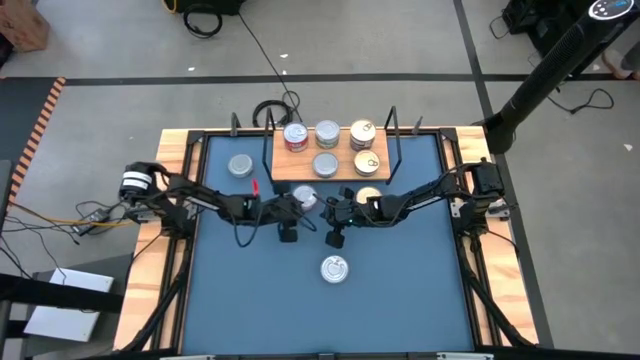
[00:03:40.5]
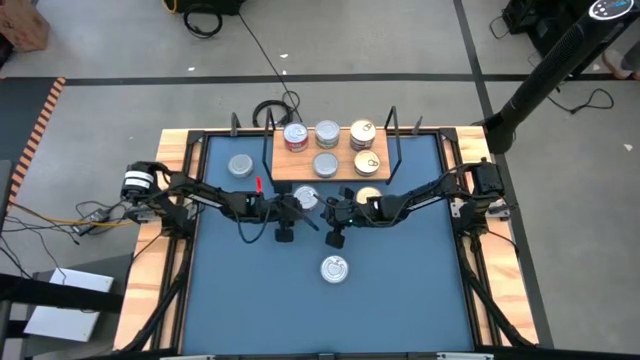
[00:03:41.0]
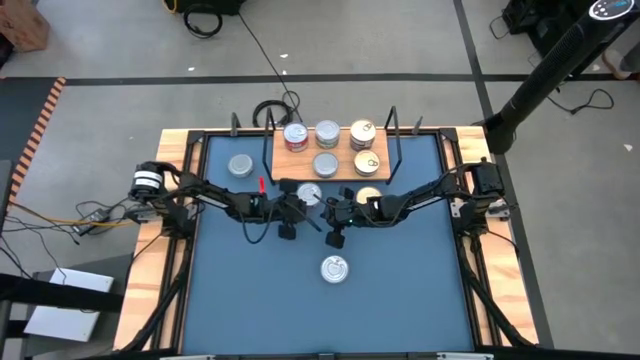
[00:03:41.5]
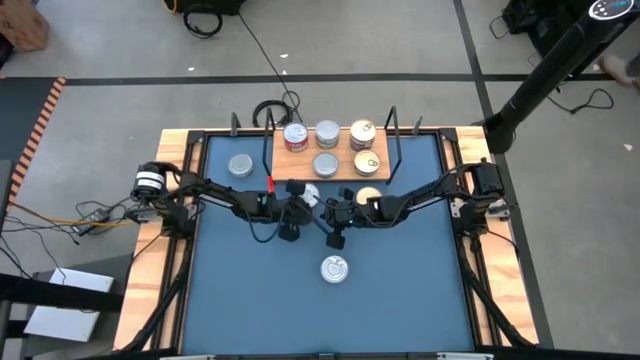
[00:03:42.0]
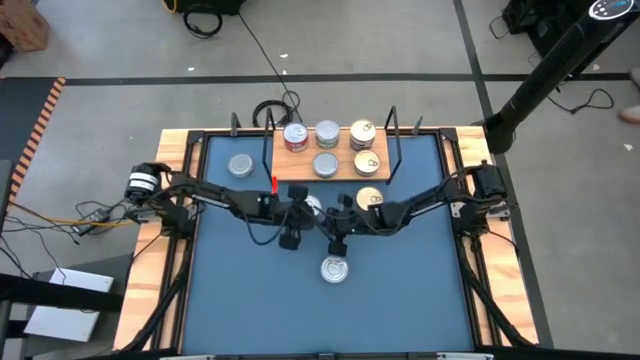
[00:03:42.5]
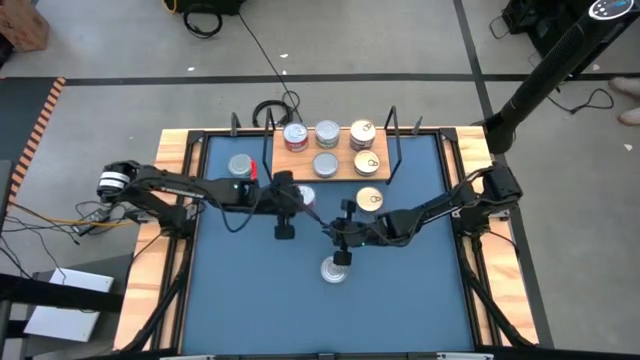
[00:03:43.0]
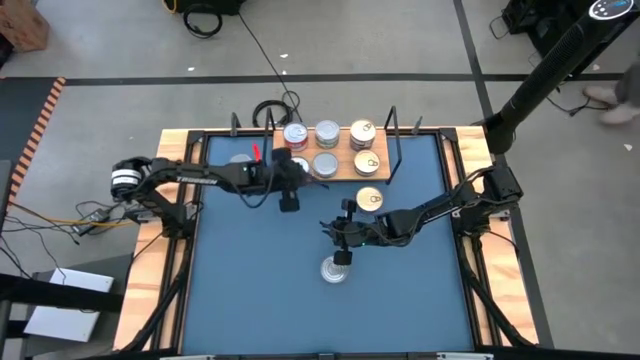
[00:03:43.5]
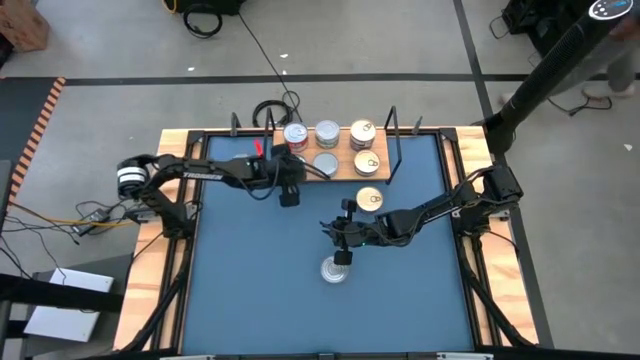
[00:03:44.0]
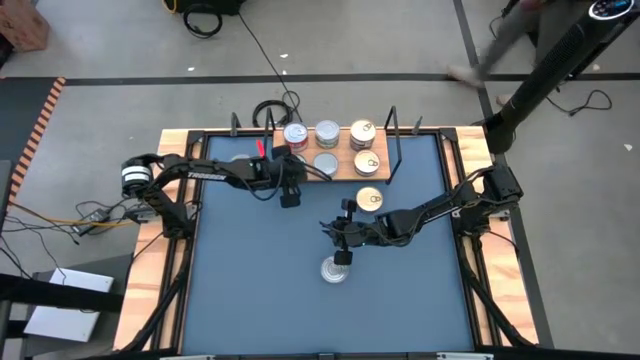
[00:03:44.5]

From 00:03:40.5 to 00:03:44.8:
Task: Stack canned seafood by type on shelf
Put the tuna can aligned with the stacked red tuna can on the shelf

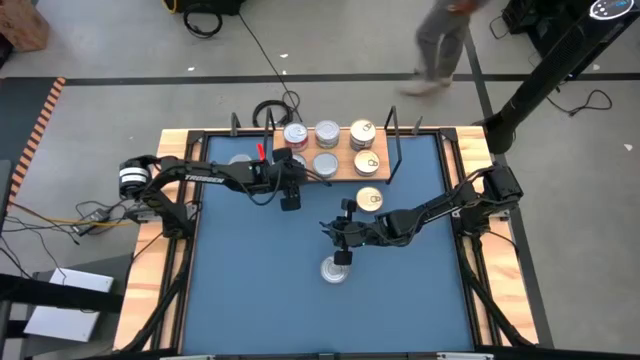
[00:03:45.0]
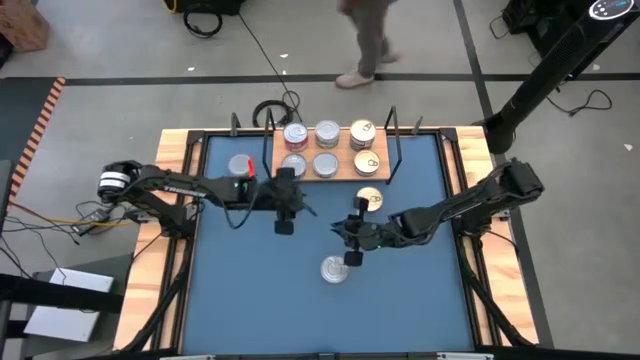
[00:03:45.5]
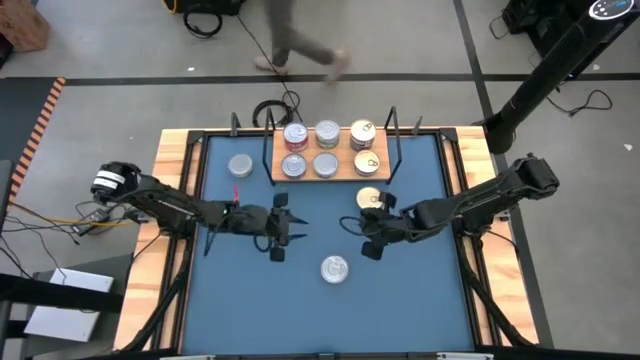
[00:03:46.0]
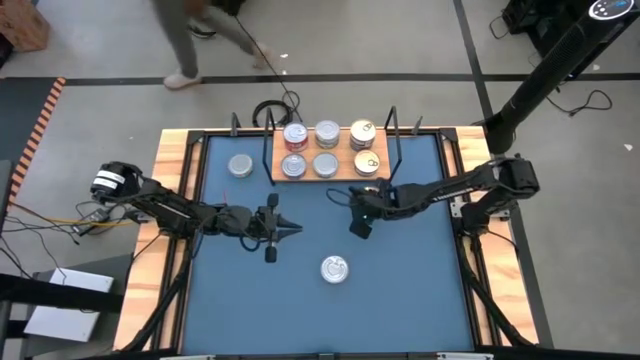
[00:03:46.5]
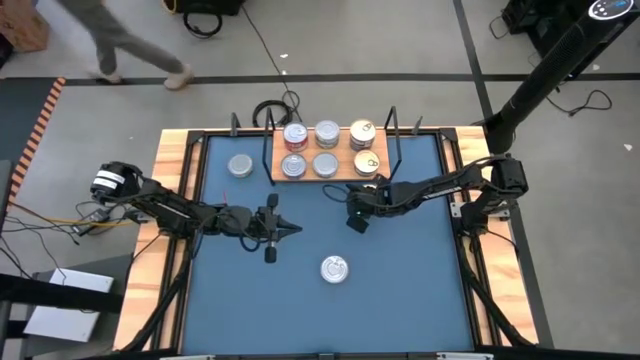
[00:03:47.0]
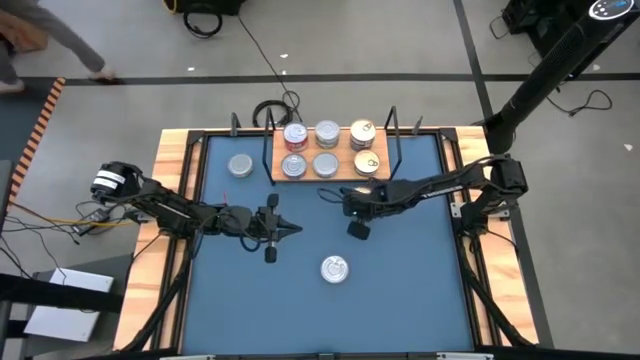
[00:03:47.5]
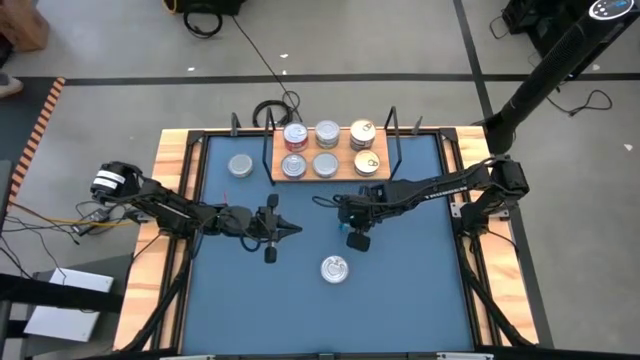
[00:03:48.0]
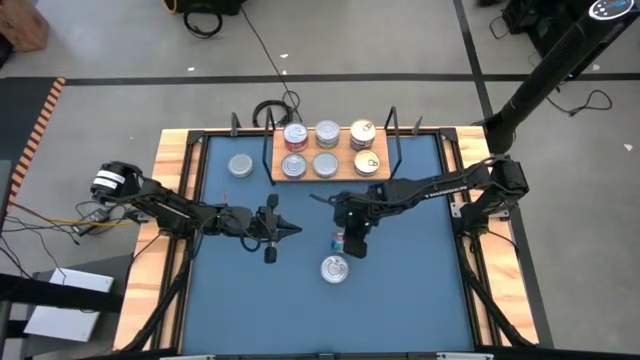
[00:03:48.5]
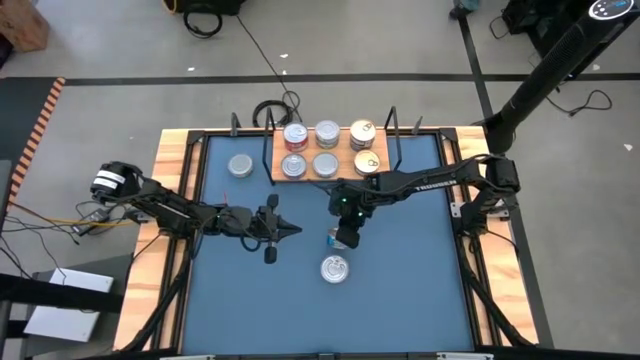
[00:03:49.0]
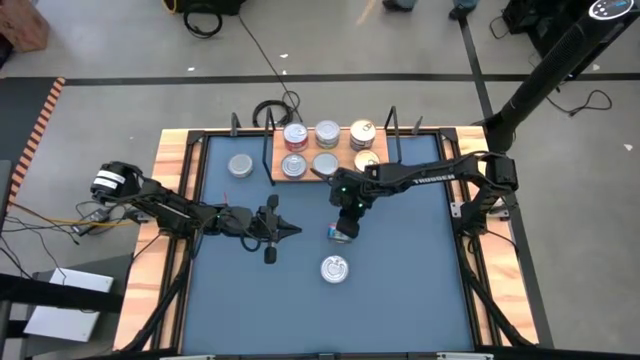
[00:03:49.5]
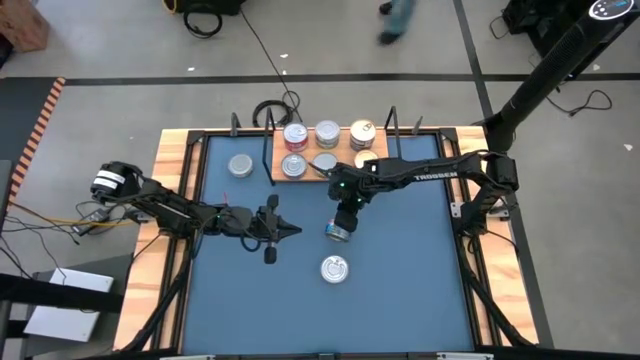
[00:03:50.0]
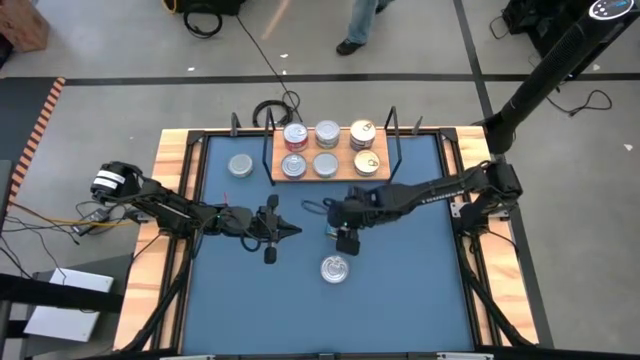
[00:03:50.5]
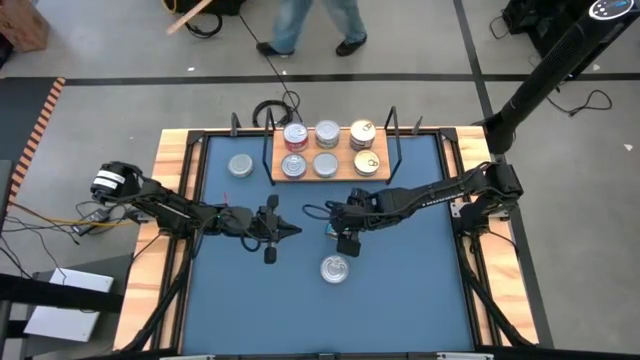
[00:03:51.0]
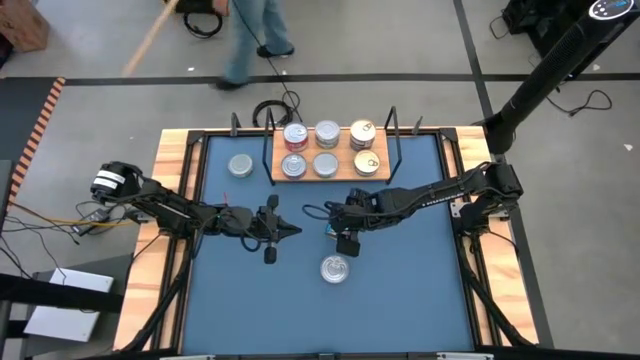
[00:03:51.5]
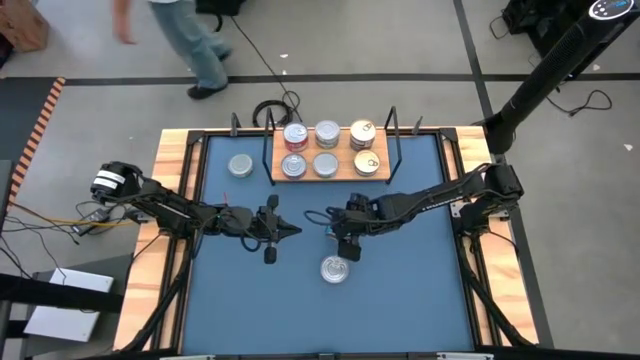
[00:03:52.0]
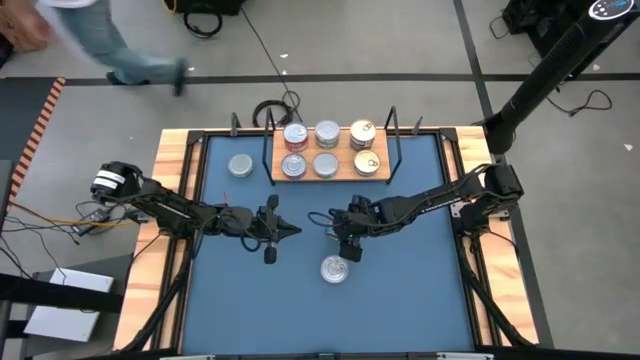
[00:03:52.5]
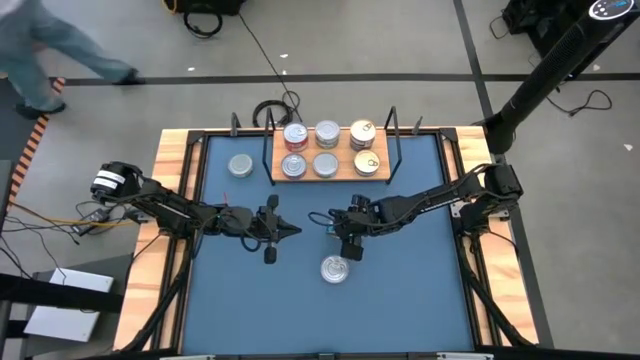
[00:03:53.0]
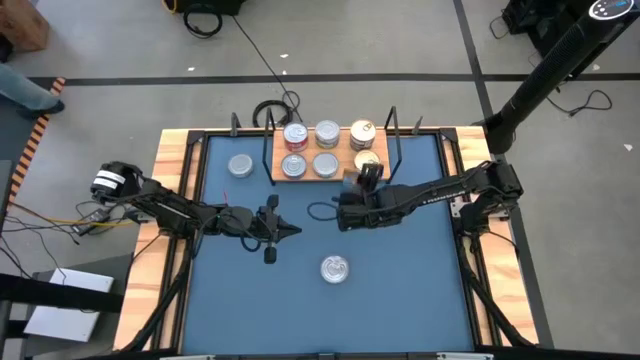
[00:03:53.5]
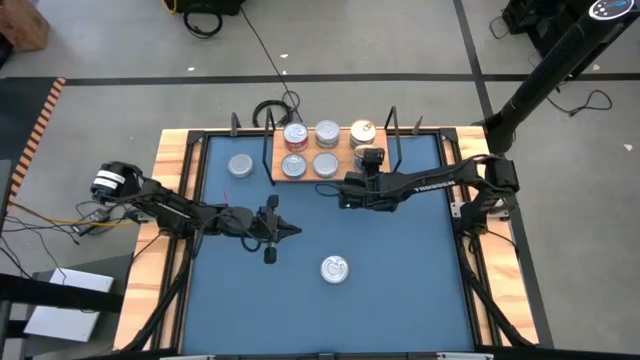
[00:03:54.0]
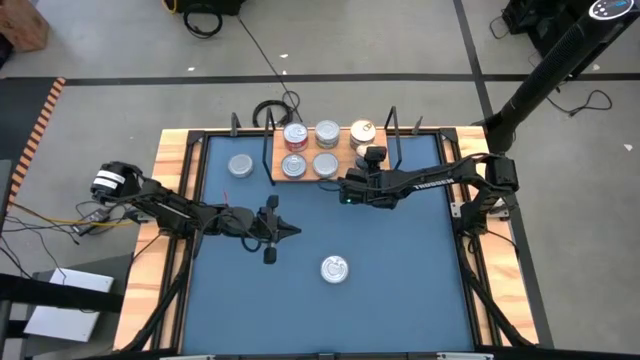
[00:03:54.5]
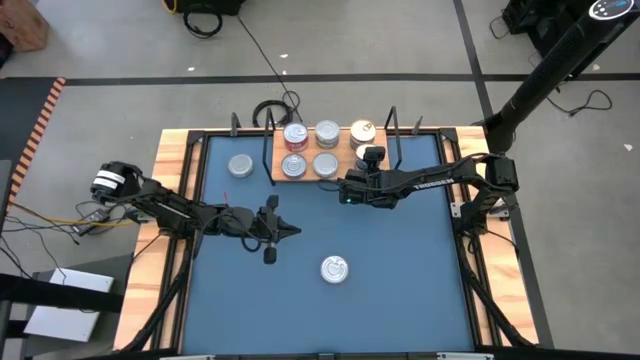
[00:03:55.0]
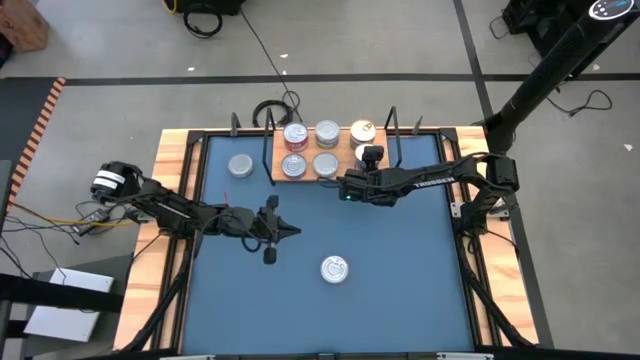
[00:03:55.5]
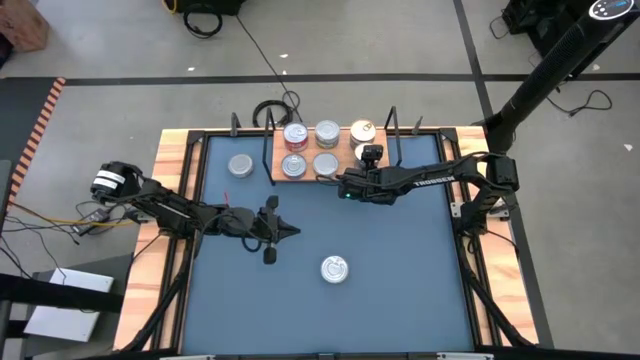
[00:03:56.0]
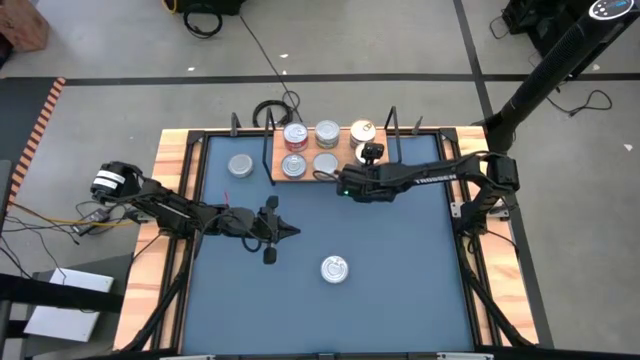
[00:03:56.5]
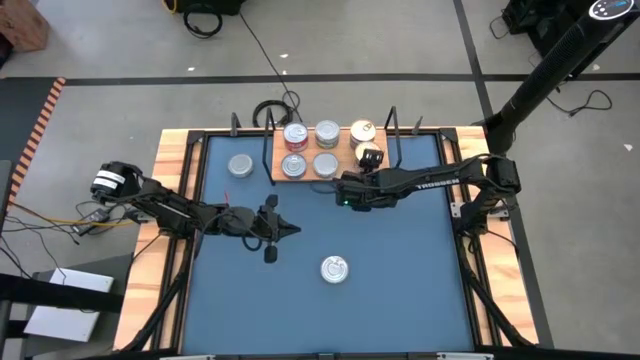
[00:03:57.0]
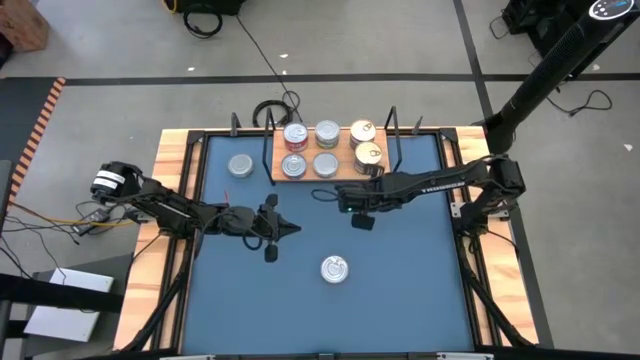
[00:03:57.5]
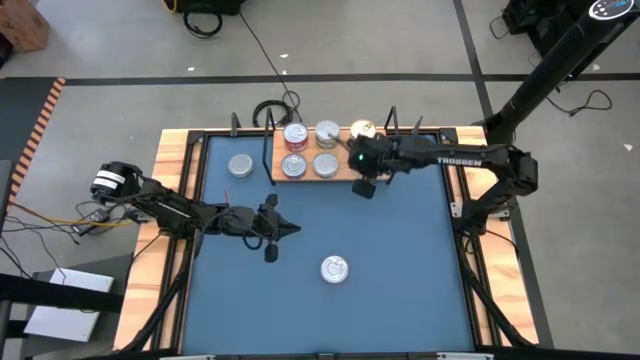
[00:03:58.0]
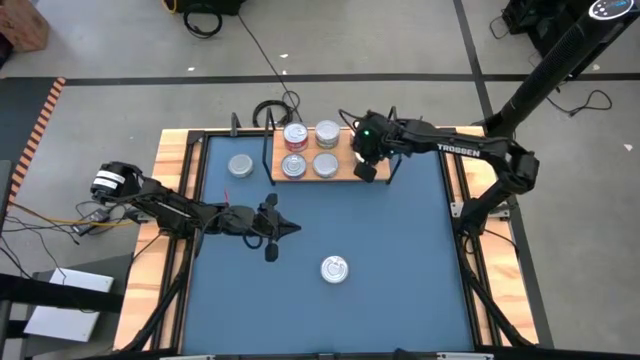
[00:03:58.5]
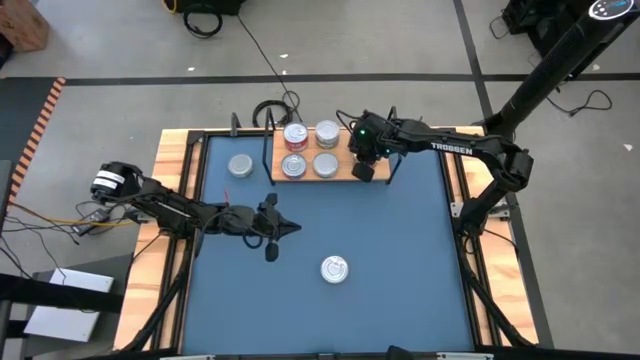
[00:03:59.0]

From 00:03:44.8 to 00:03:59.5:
Stack the blue tuna can on top of the other blue tuna can on the shelf
